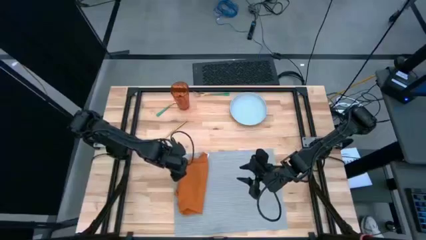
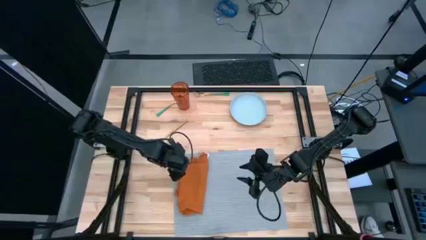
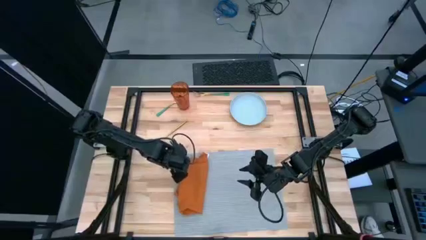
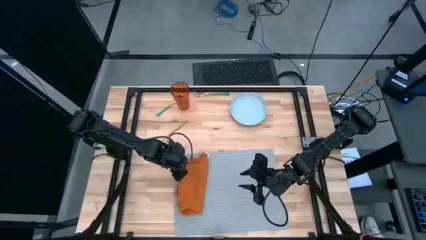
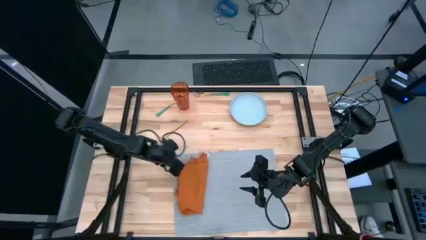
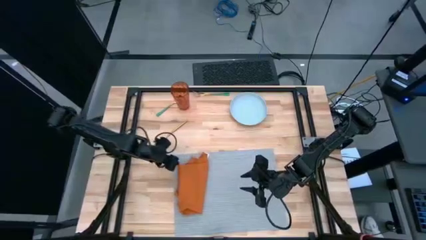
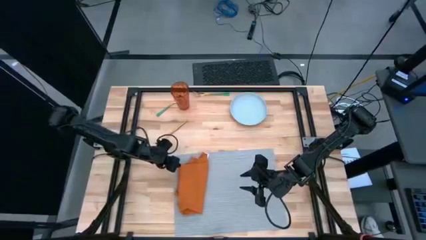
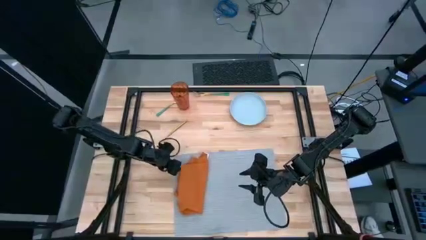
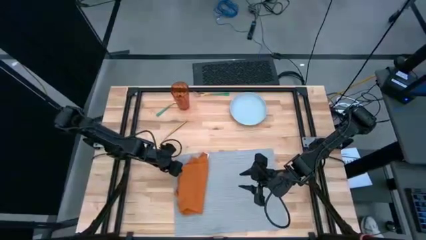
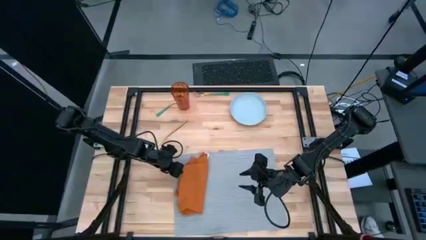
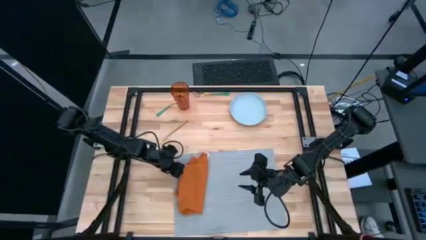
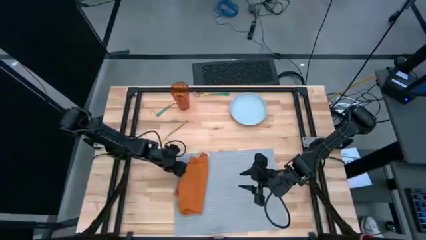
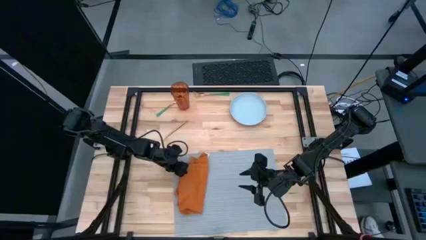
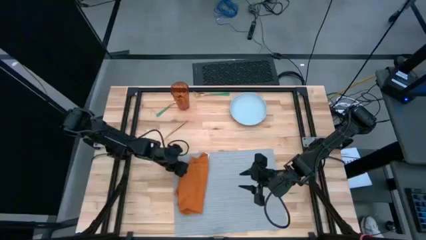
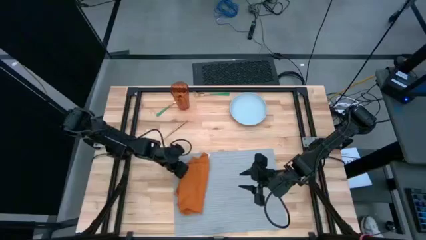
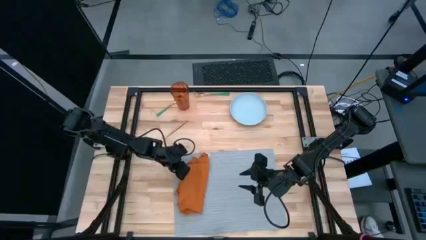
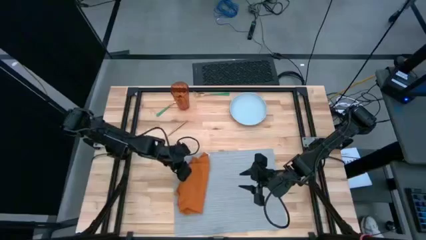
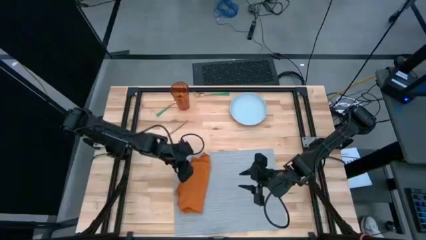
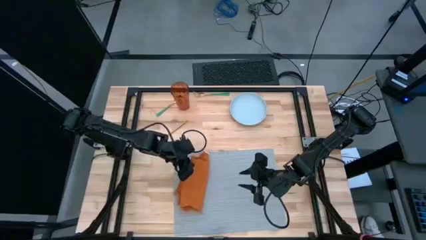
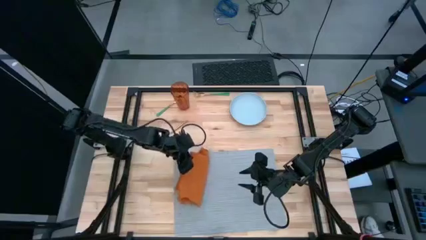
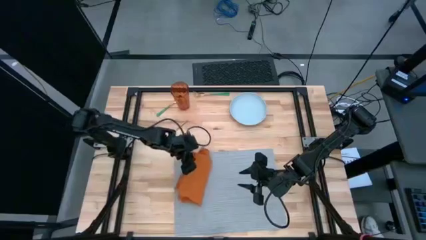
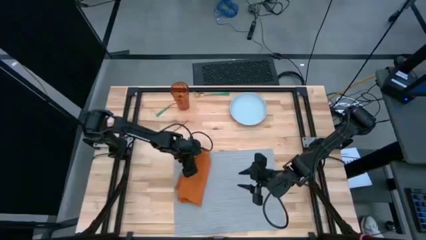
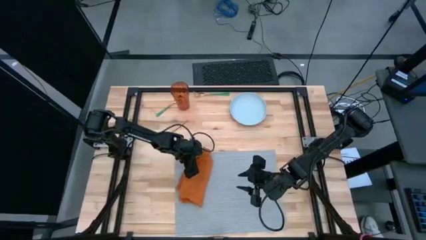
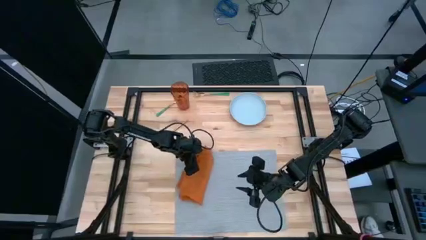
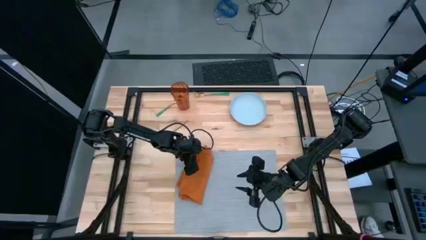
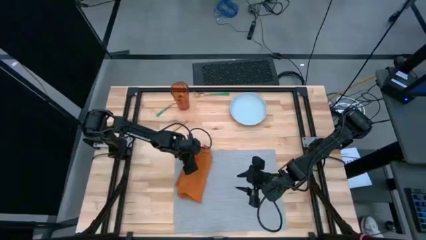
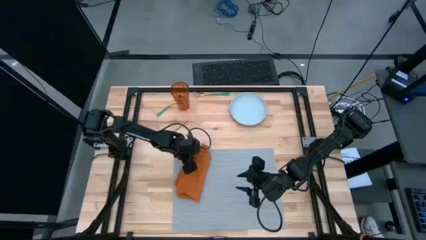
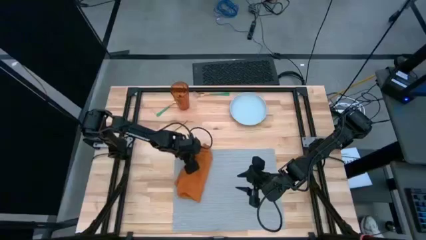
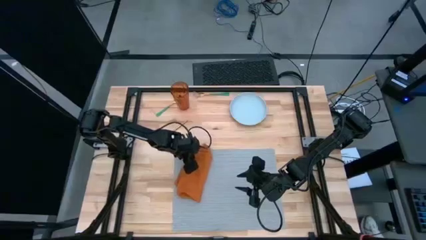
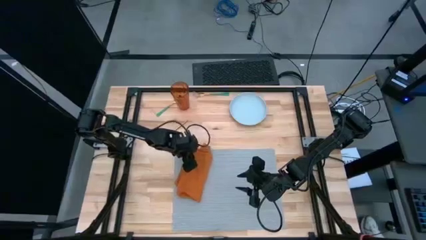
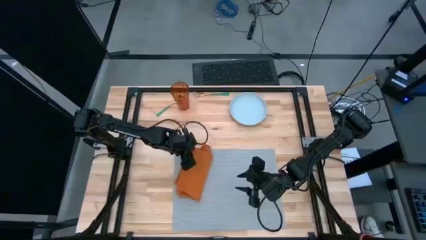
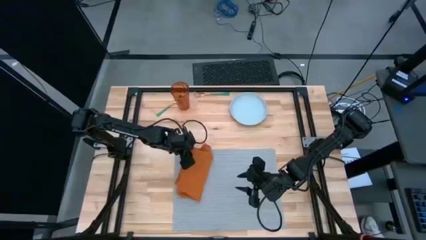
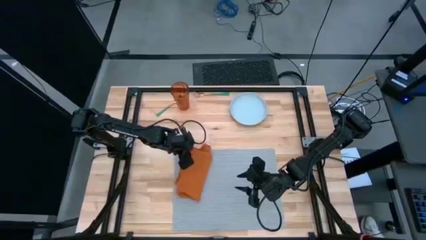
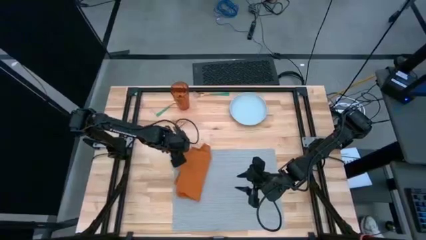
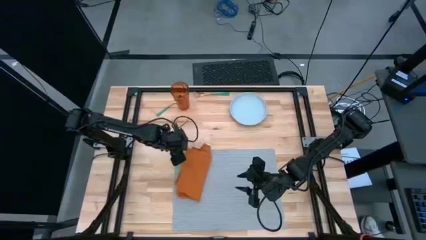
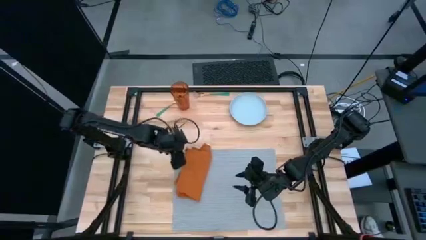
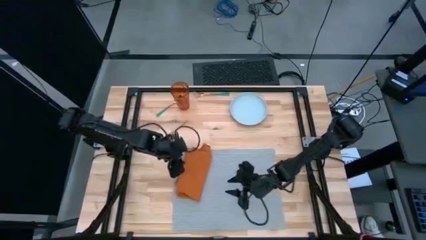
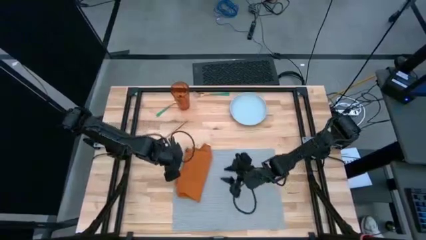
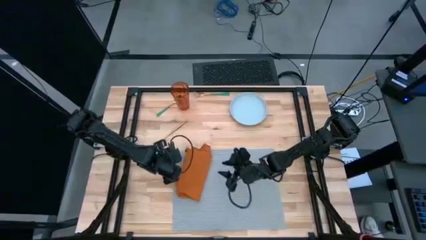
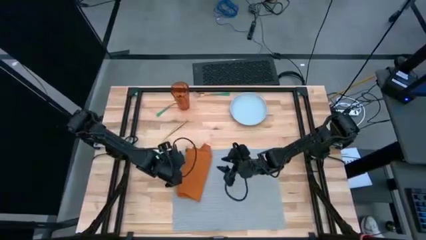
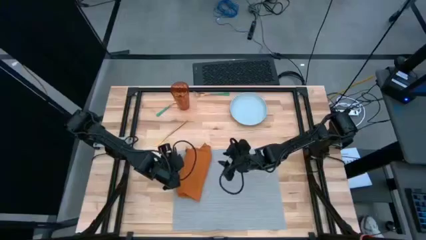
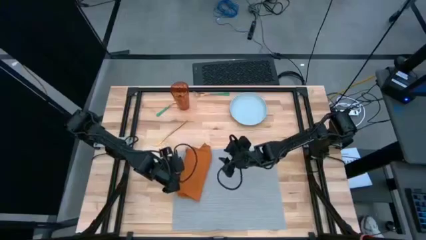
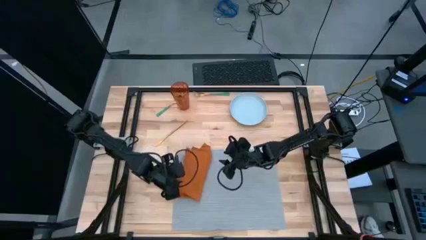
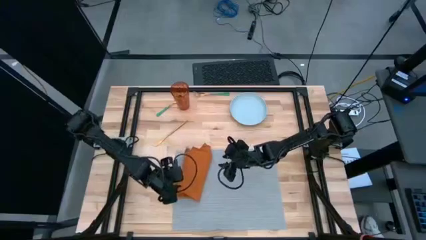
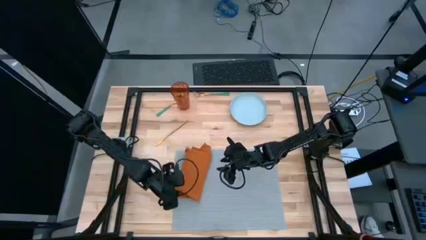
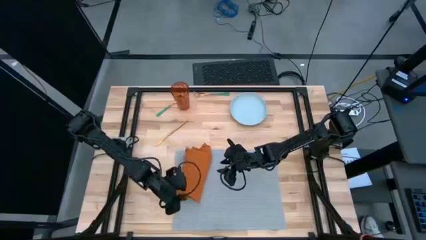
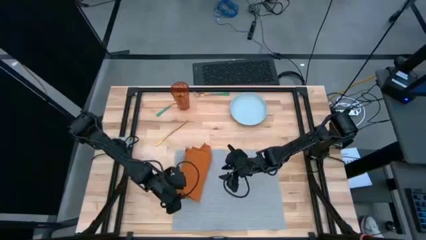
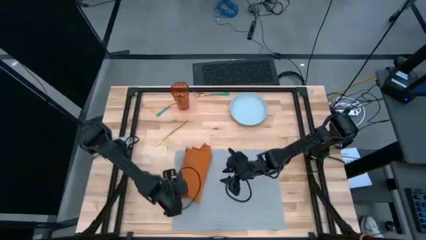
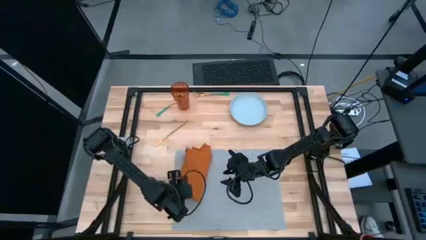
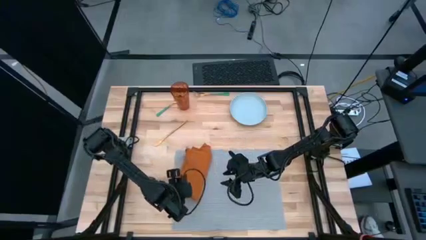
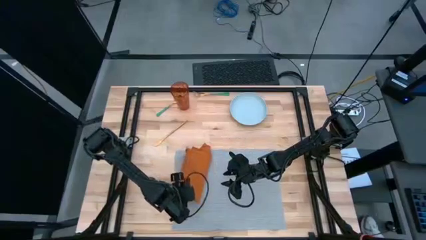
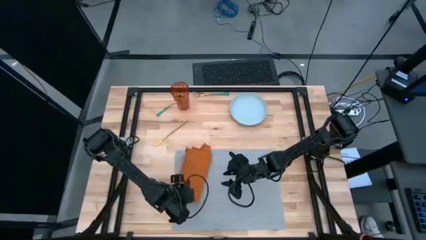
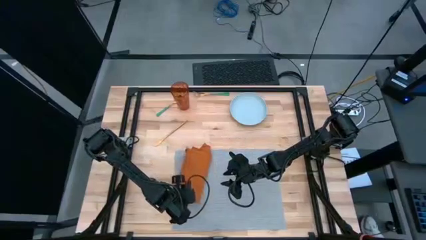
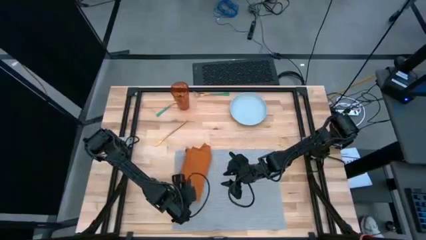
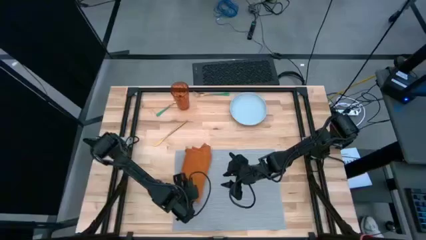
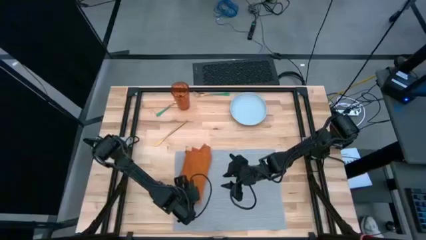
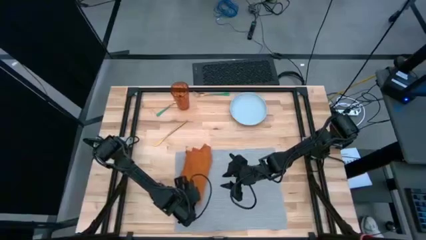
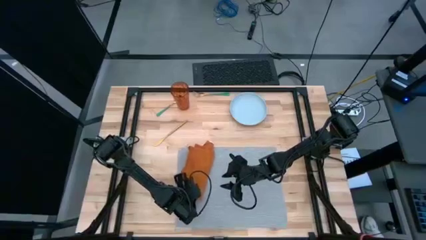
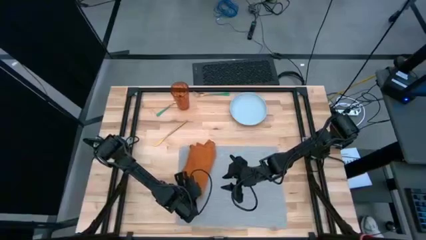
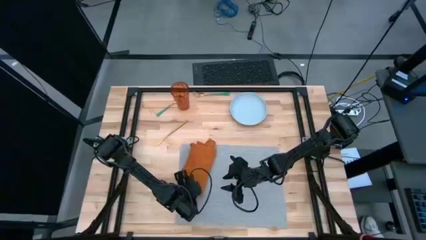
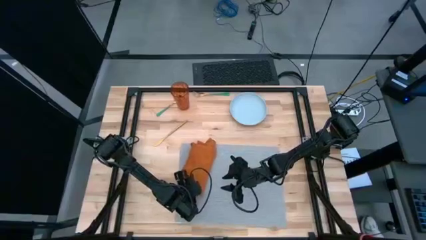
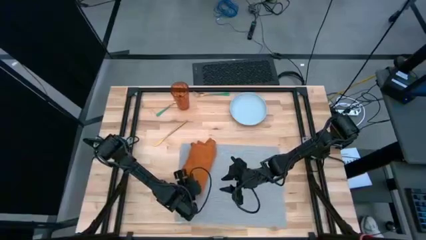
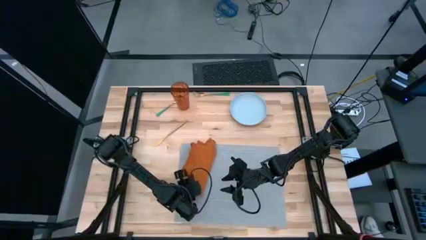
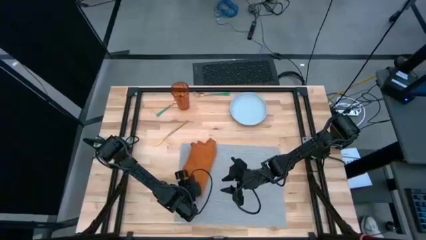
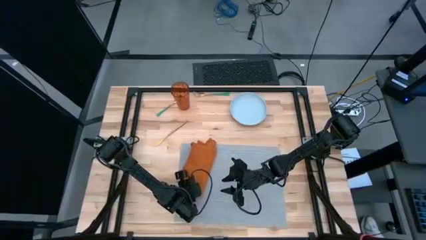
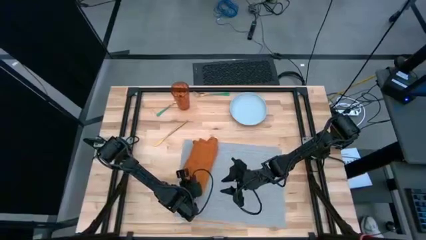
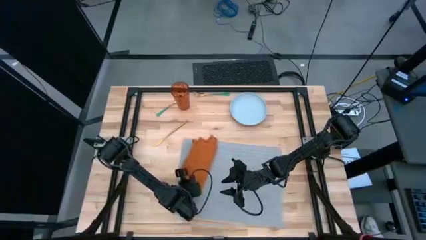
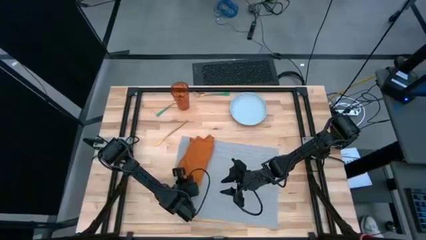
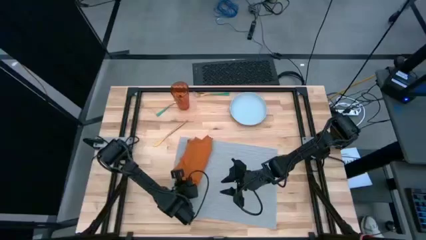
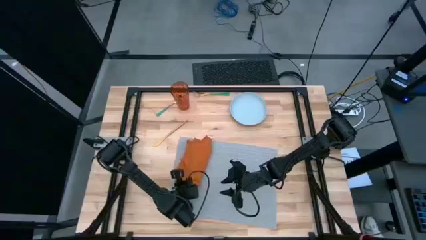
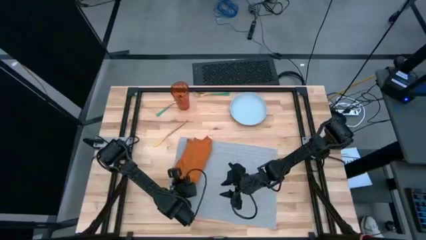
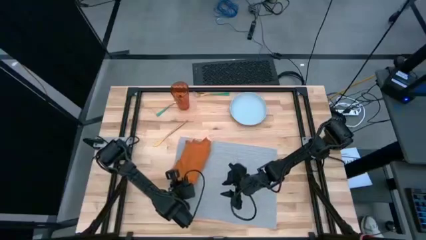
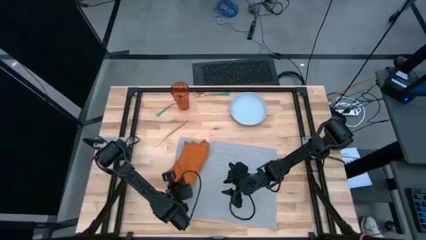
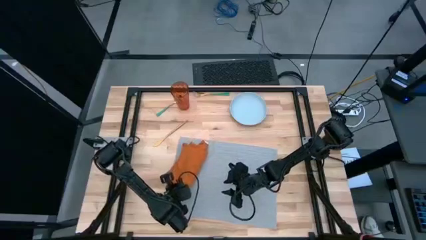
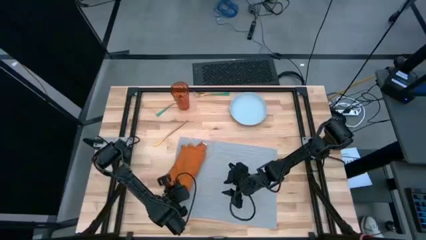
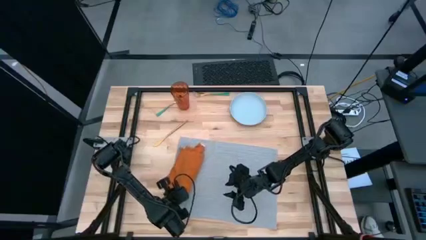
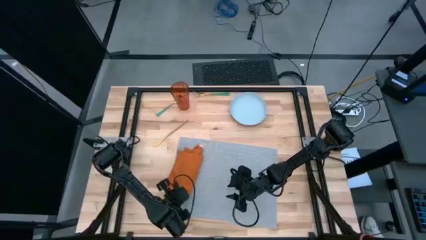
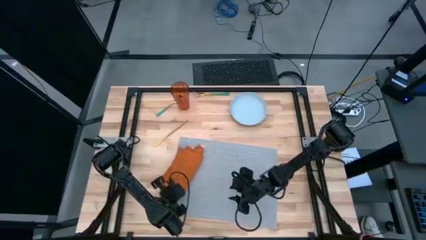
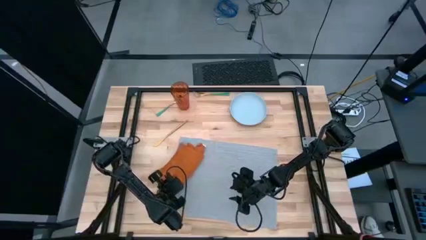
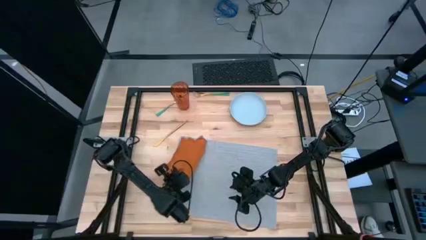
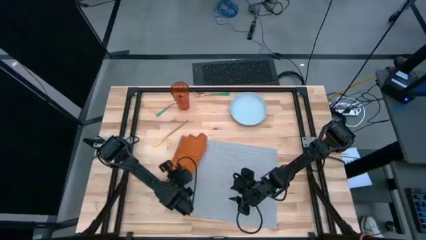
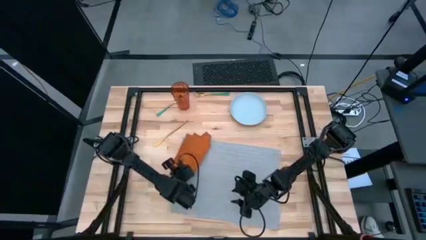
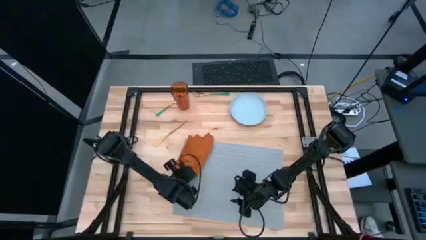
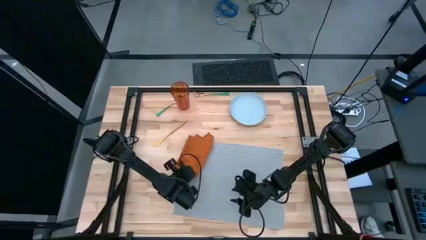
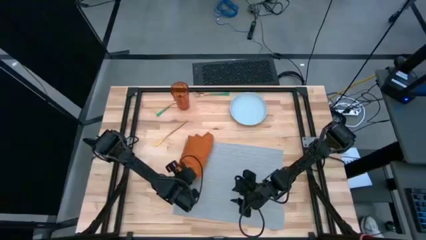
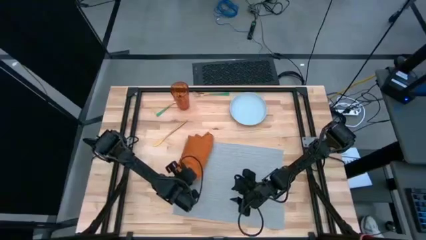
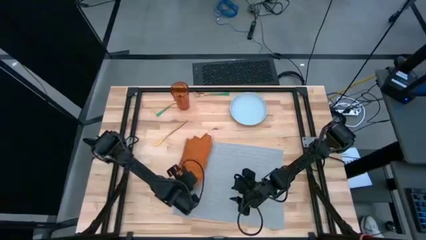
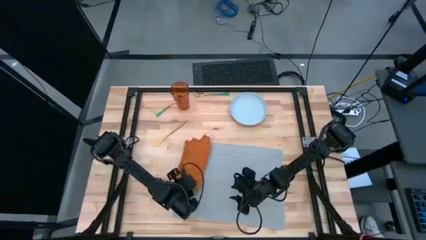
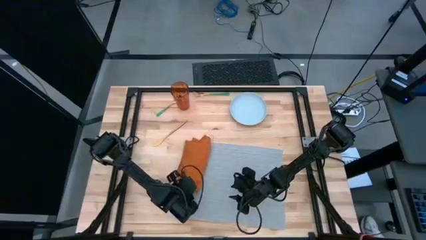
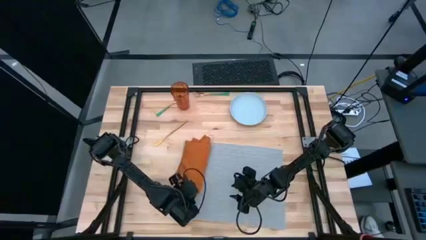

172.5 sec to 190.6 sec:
Task: Set table place
Fold the orange table napkin
